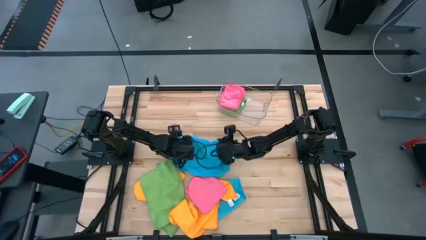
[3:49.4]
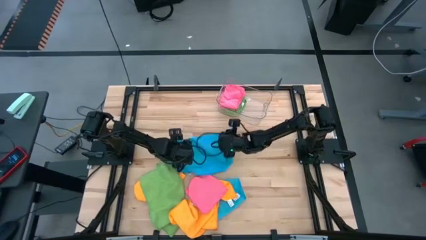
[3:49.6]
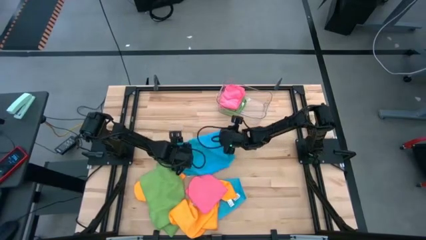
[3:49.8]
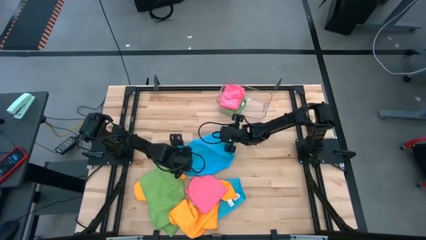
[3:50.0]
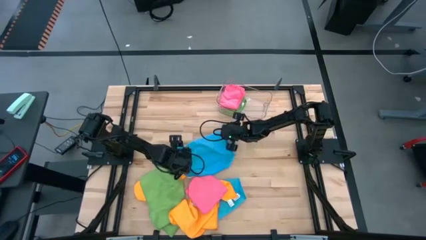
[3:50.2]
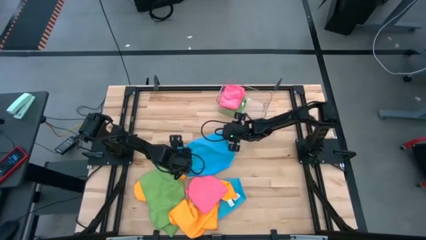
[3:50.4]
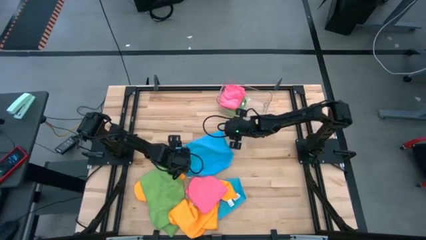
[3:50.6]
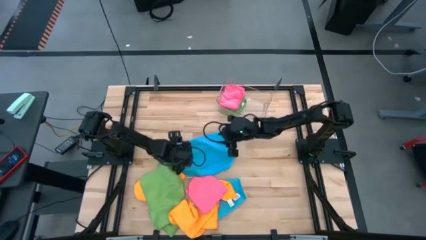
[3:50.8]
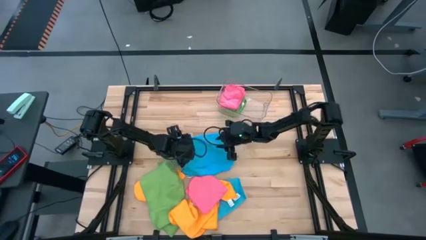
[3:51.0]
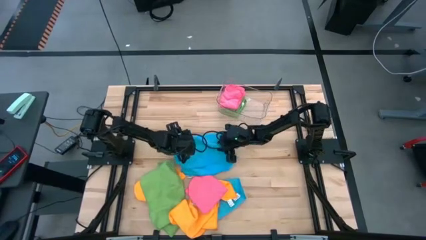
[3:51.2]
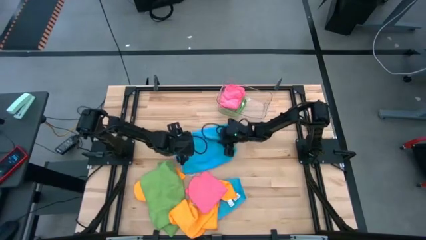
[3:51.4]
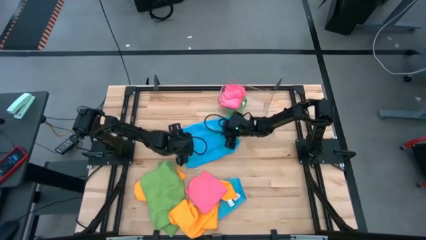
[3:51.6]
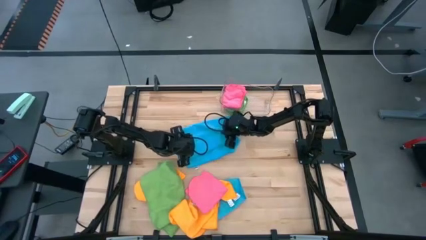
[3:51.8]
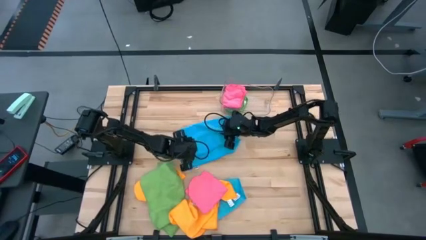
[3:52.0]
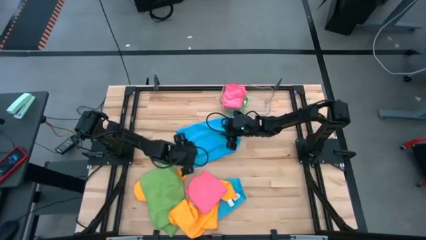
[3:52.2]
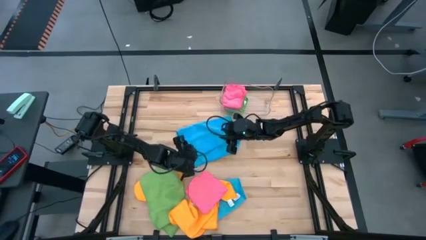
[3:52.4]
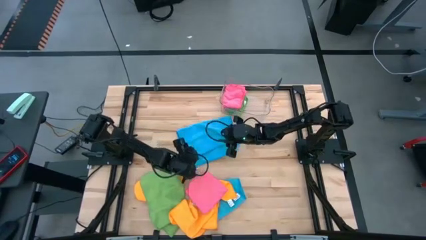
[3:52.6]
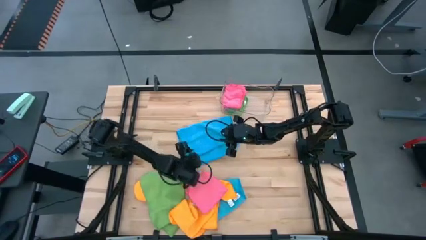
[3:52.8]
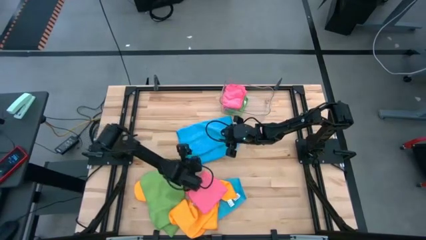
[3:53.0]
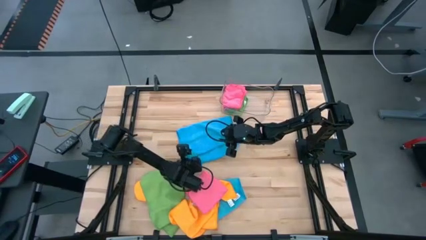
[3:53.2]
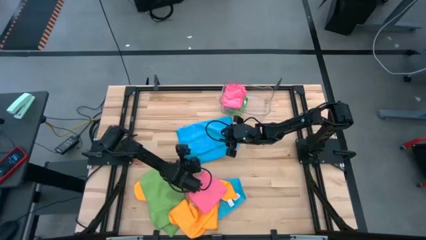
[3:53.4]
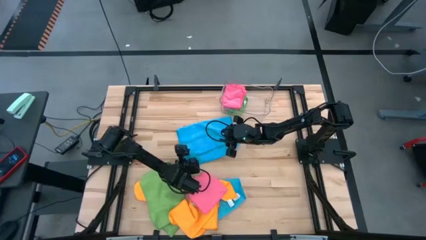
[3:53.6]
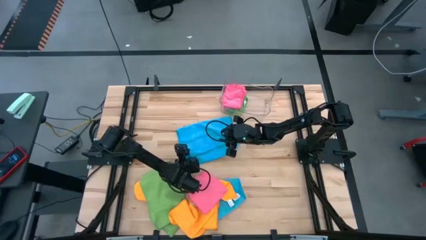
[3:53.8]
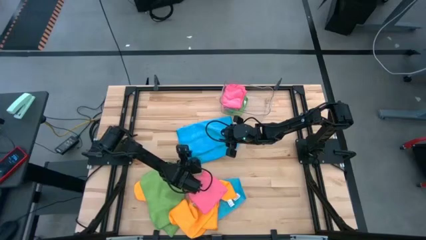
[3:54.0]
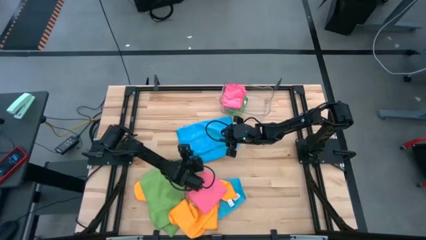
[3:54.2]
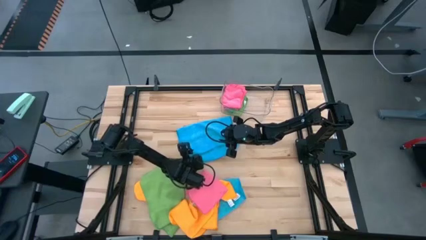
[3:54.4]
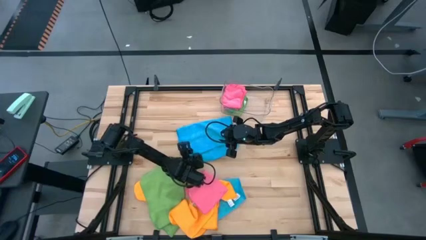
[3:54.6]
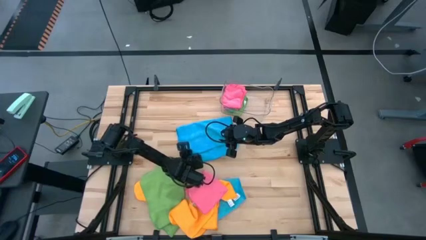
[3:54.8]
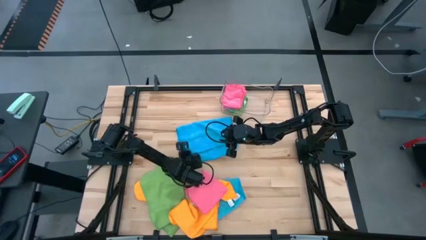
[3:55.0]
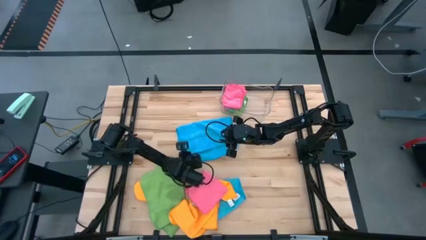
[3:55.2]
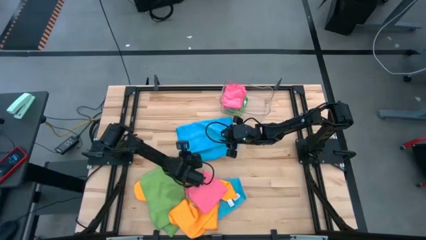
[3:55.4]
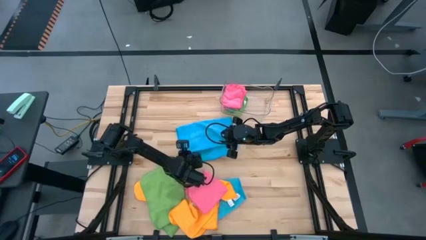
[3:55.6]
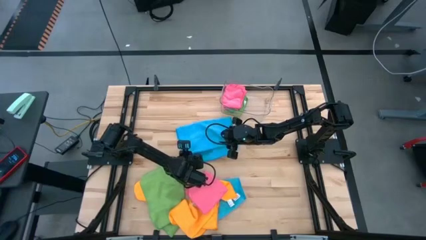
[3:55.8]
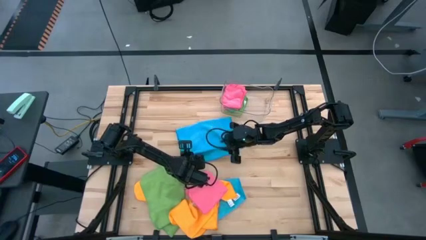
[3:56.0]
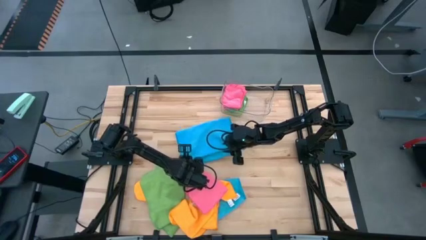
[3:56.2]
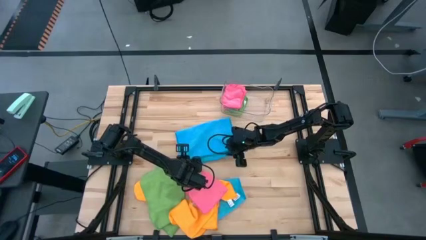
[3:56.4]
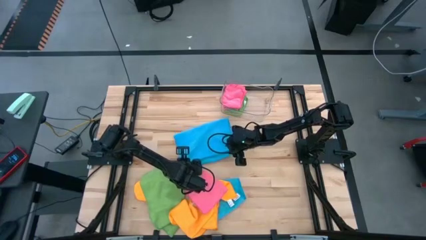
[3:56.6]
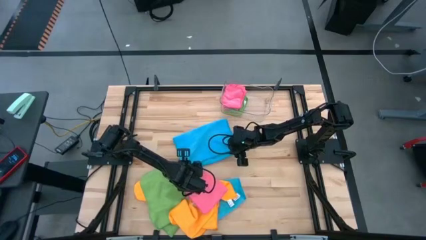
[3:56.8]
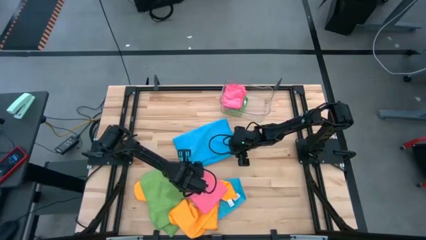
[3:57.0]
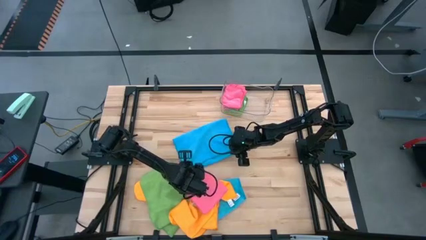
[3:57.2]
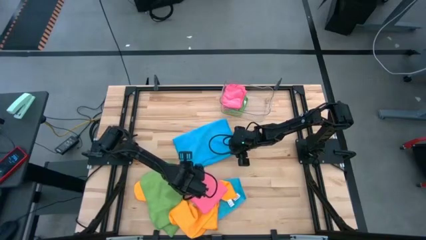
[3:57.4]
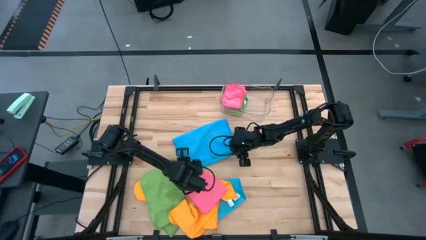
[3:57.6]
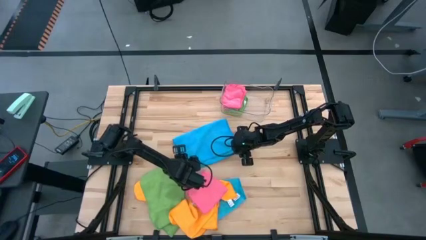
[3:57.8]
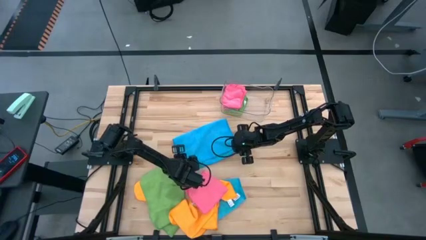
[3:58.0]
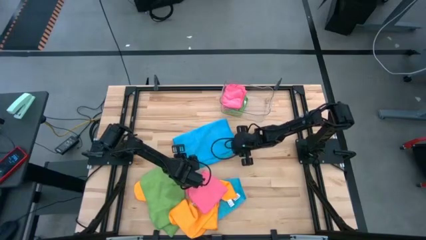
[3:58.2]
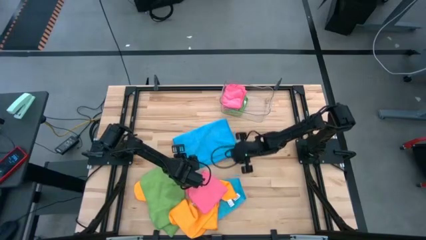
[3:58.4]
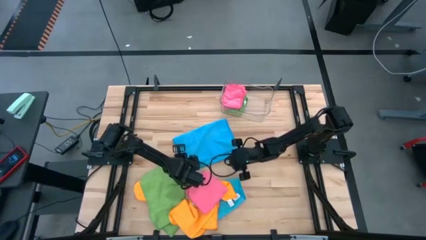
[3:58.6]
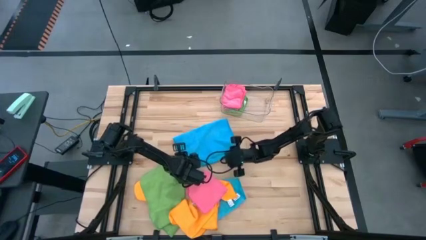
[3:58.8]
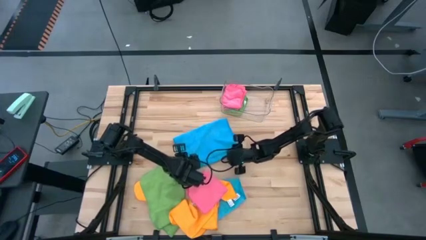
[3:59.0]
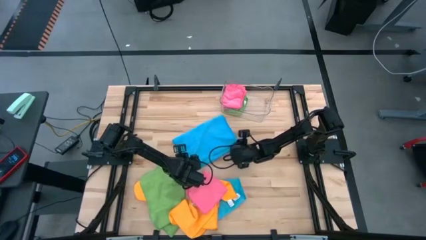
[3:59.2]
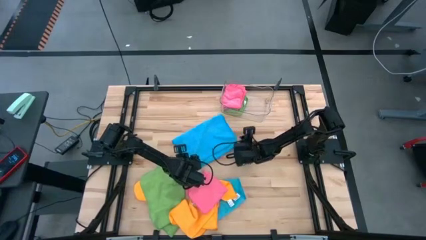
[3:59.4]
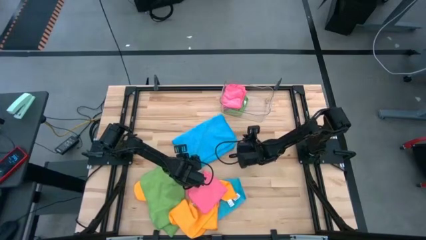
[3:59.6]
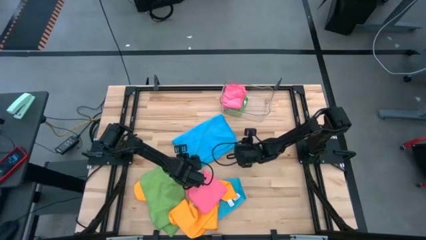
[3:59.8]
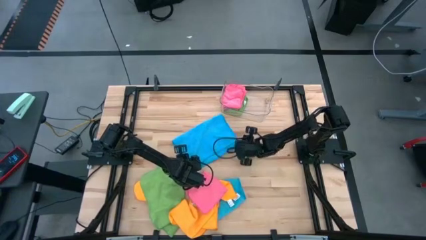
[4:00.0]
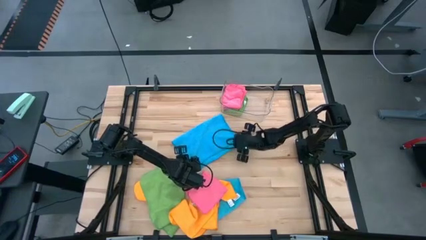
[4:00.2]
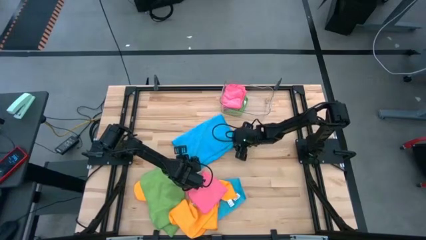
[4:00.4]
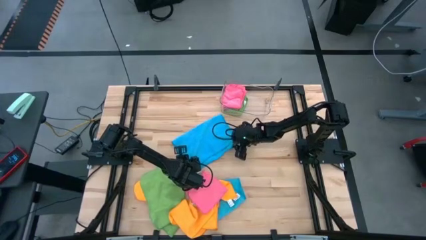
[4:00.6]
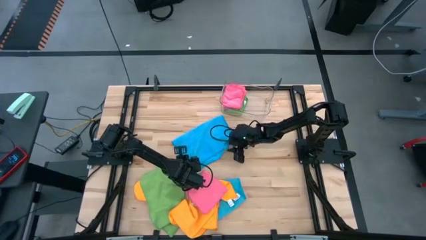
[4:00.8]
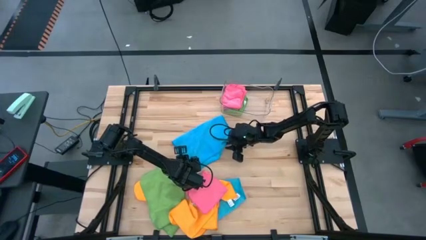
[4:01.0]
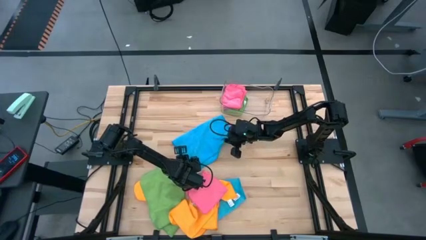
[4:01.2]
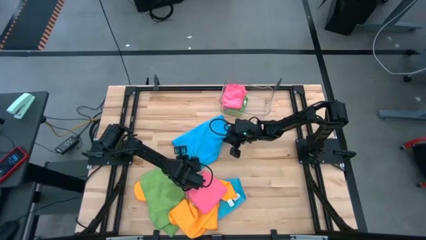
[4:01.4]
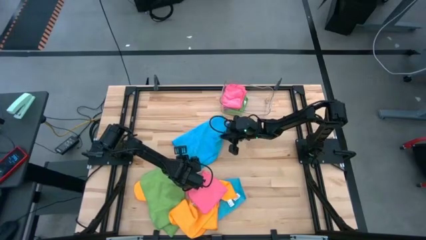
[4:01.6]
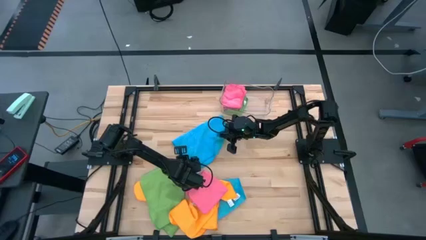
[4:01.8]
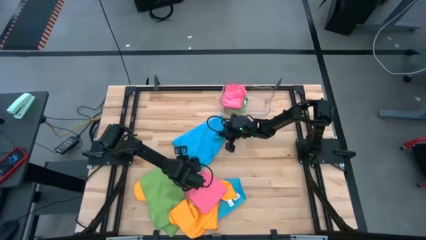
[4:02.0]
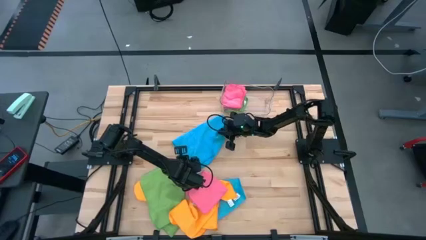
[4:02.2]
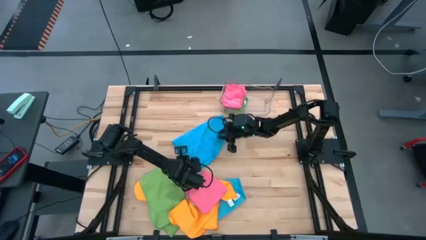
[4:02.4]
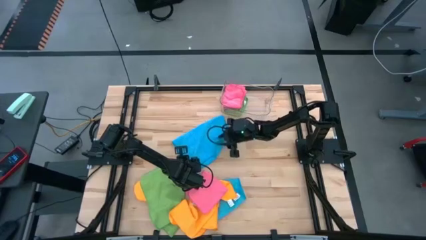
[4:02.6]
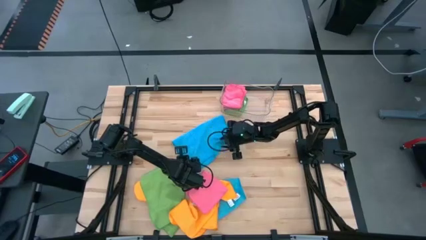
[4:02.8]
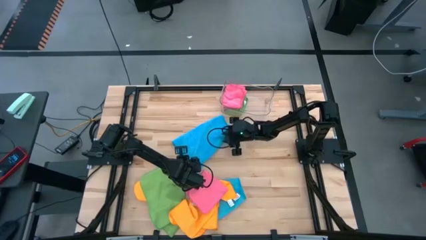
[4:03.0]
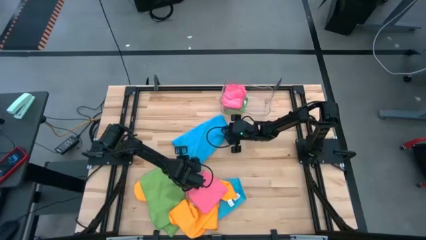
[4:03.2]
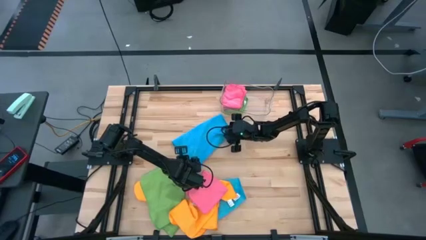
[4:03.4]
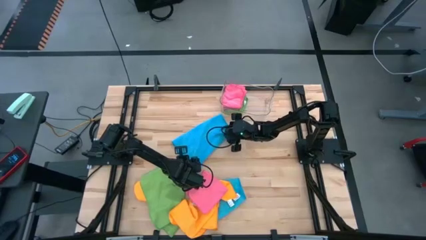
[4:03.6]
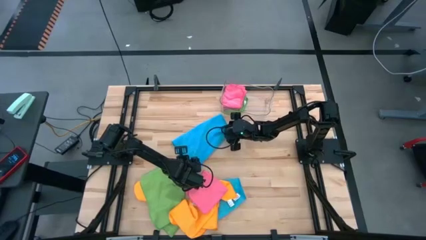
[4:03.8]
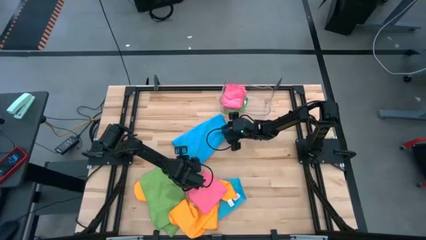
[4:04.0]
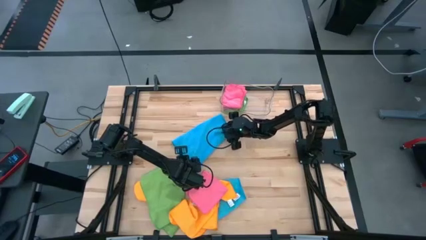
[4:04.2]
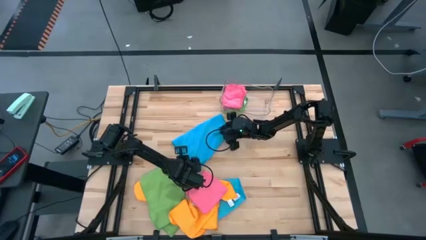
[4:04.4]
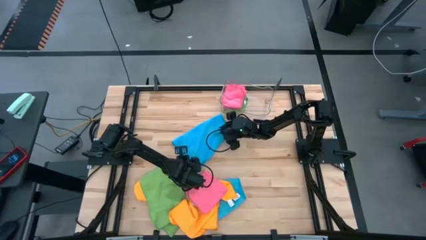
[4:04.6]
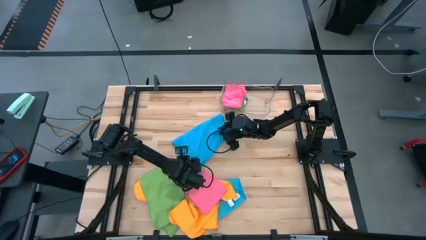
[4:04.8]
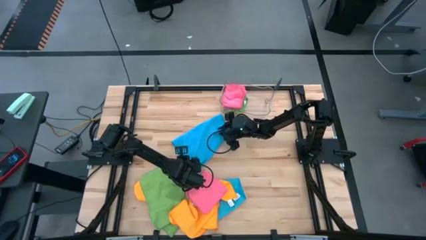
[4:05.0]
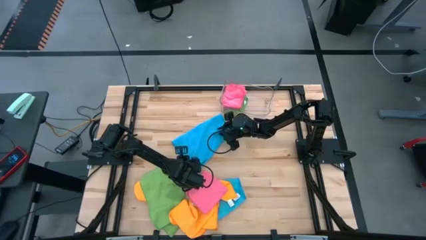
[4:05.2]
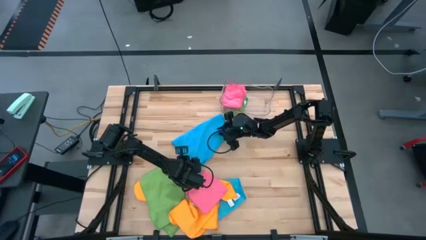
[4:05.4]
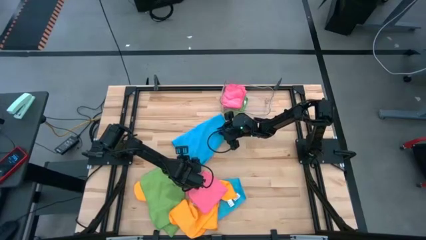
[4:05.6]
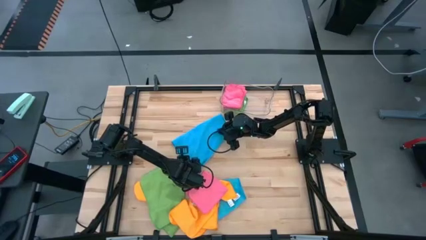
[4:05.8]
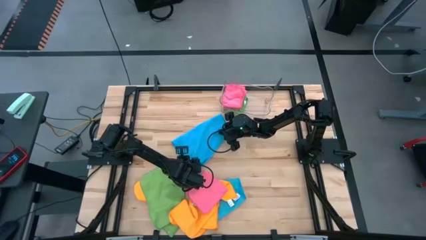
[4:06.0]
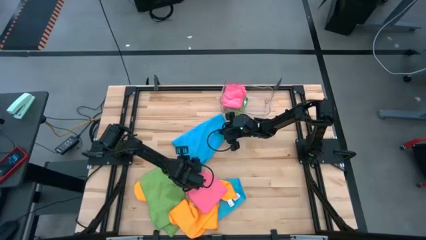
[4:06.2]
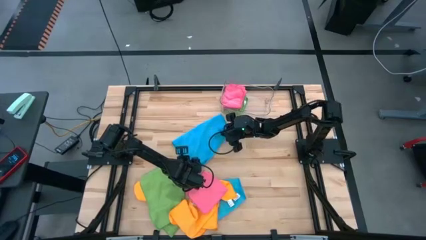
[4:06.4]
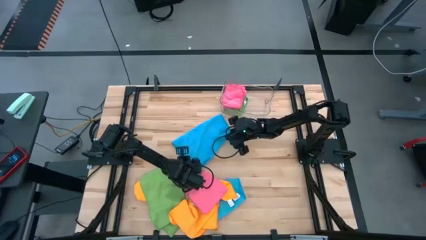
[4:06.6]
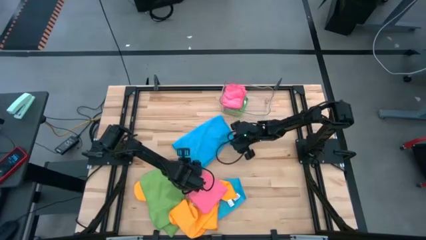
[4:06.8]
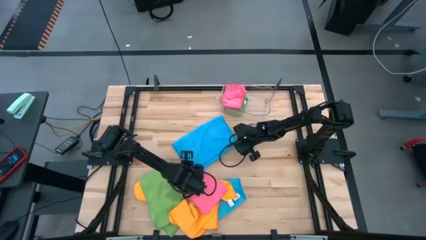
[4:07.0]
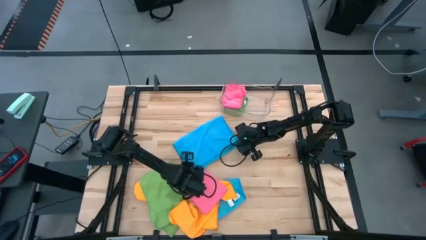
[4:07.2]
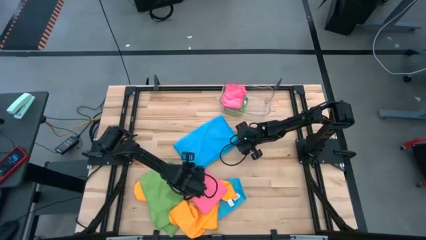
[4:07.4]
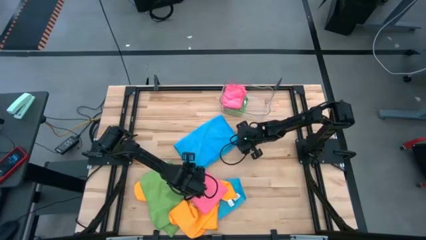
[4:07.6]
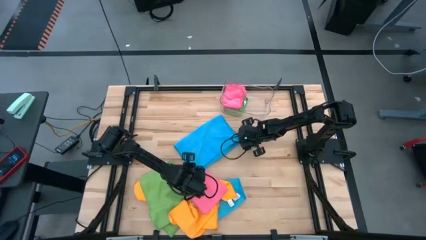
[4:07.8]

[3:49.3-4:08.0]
Task: Fold microfiber towels
Fold the top blue towel
